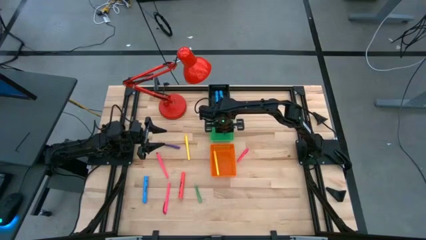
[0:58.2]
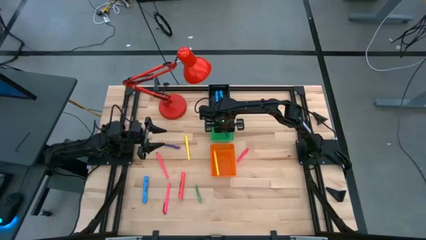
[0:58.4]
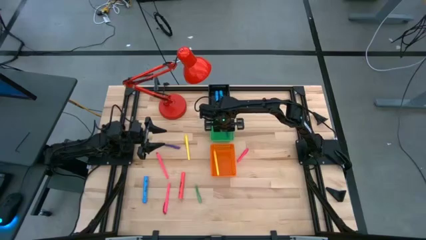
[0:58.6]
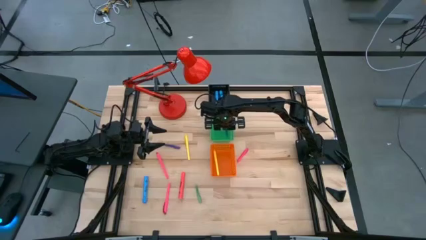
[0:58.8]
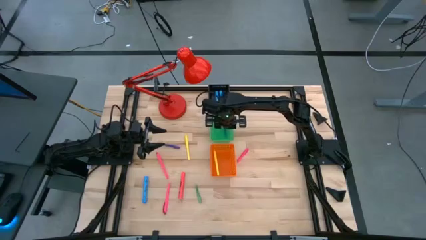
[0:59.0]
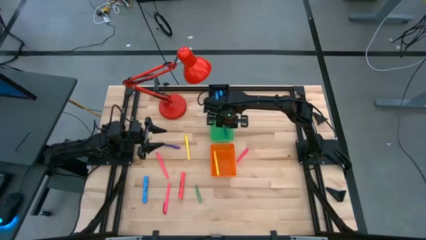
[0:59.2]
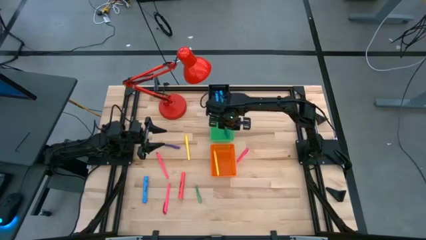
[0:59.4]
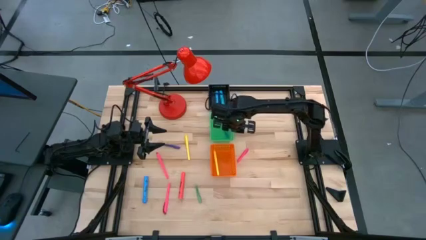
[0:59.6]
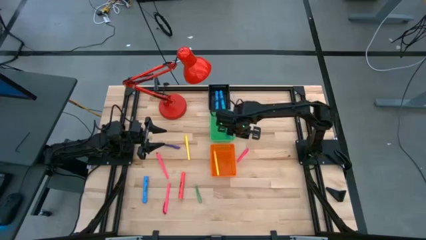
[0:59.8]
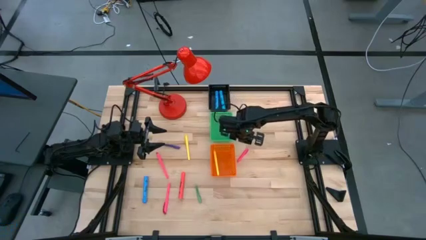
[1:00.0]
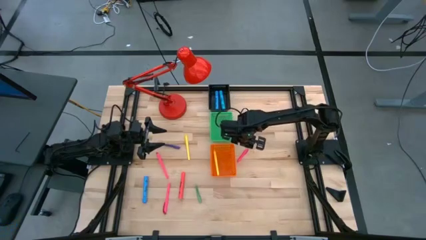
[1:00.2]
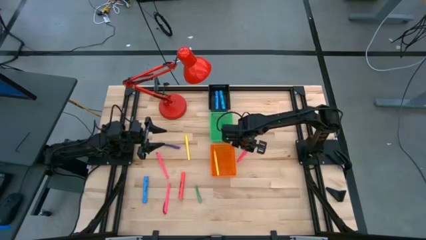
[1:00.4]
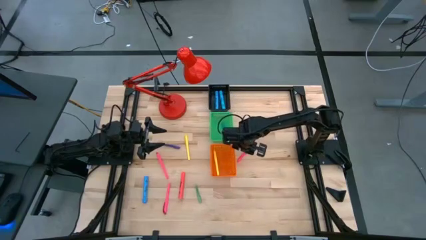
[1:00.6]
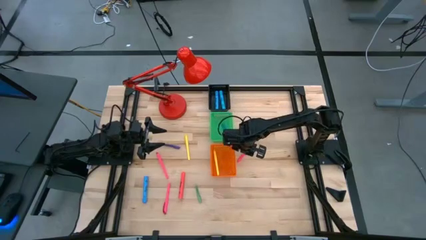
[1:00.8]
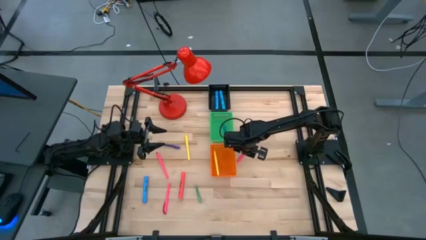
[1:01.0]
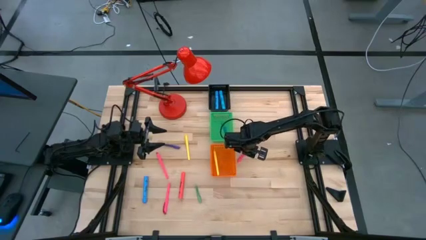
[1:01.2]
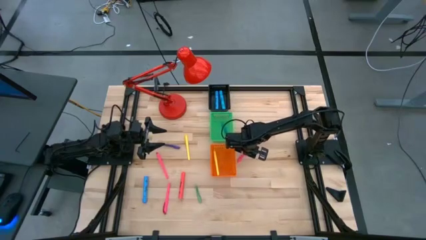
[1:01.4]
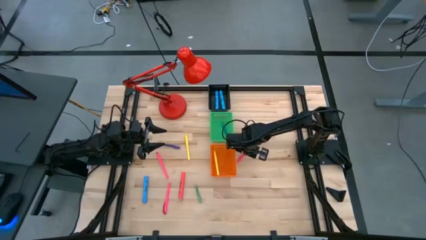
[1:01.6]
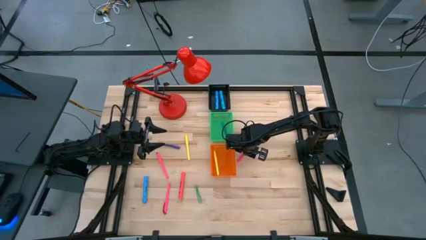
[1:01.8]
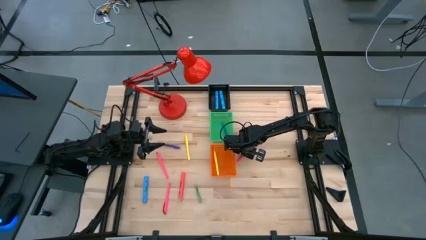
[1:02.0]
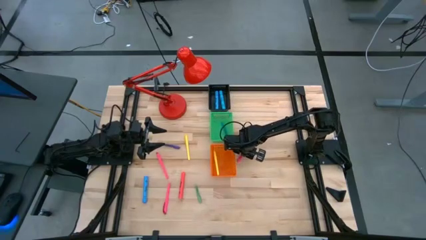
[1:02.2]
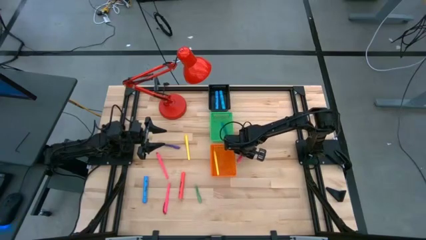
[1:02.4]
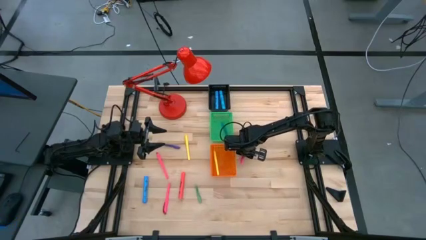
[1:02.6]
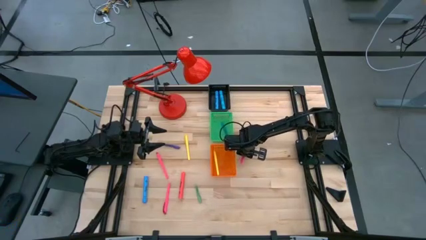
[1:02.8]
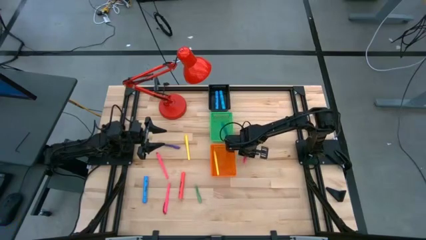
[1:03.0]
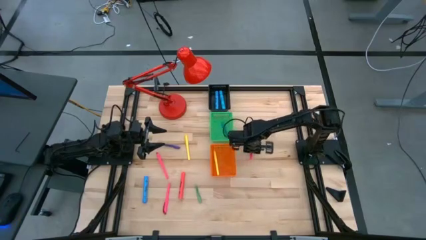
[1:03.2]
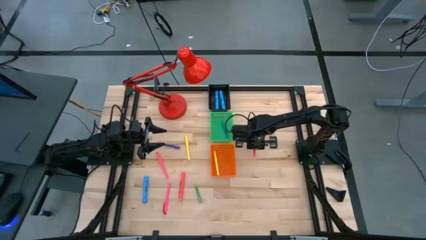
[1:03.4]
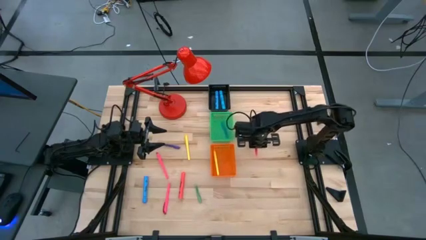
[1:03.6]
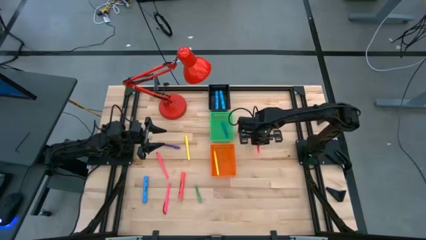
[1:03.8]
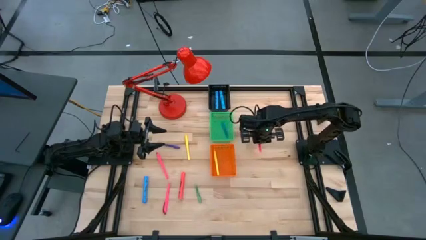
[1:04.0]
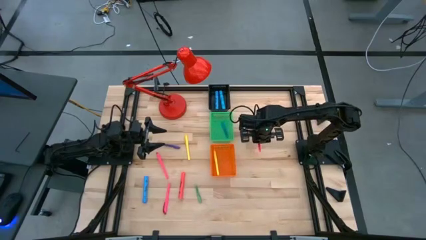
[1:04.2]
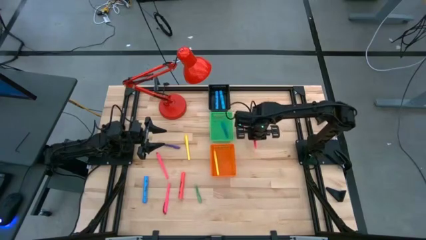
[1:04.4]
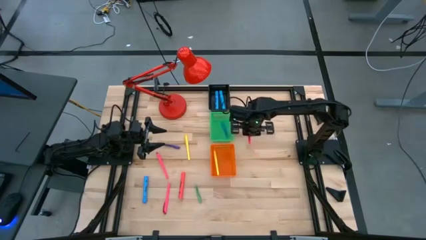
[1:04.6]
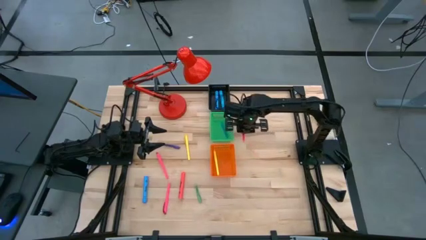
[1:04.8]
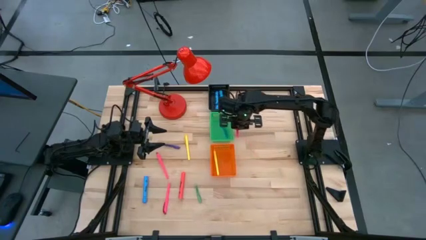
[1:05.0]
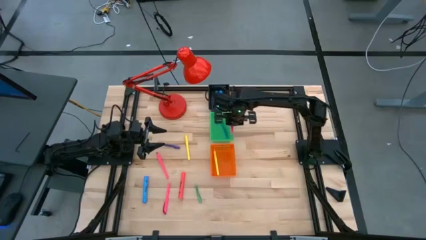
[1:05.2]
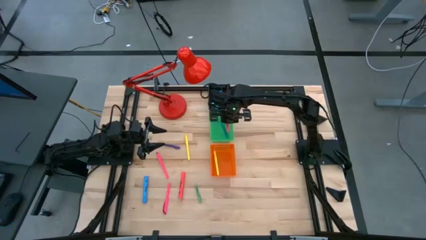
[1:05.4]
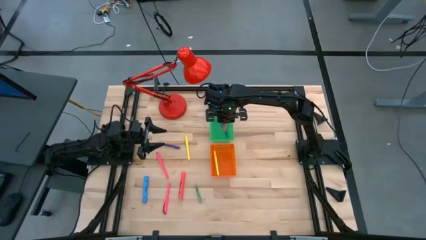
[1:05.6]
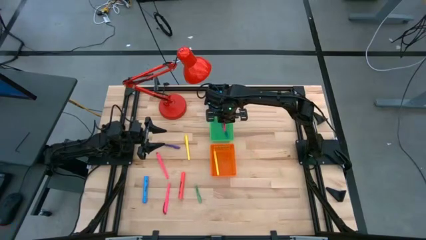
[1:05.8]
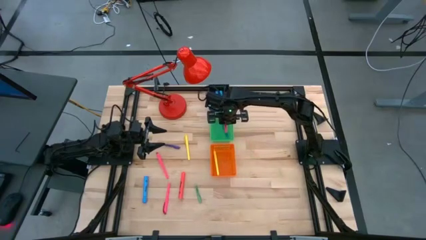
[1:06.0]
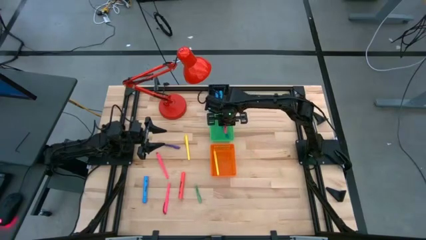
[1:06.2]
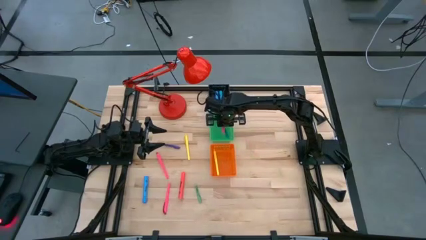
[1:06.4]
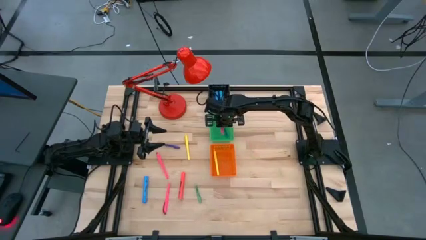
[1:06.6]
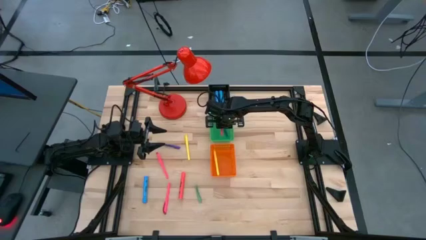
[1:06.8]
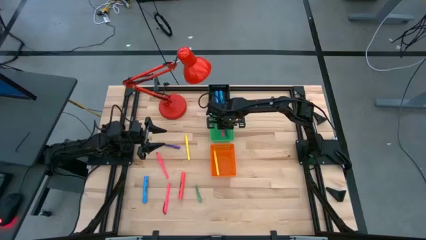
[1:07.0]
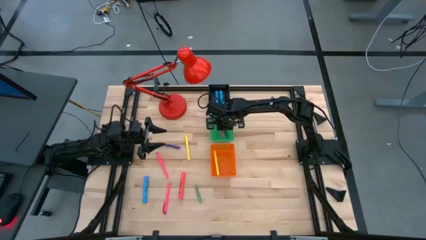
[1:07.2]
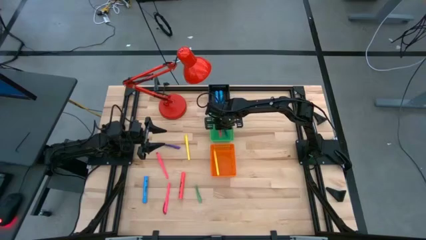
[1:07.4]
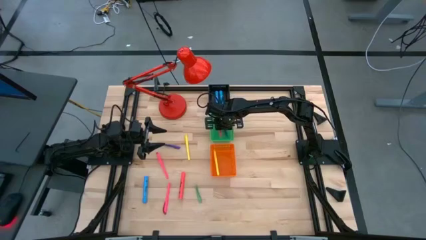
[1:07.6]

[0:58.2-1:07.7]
Task: Pick & Place Markers
Put the pink marker into the green bin

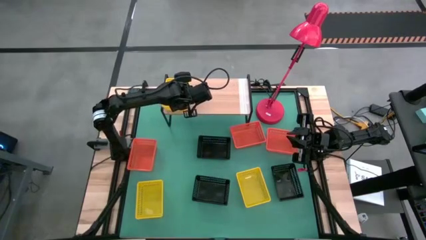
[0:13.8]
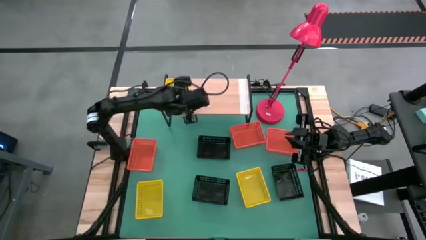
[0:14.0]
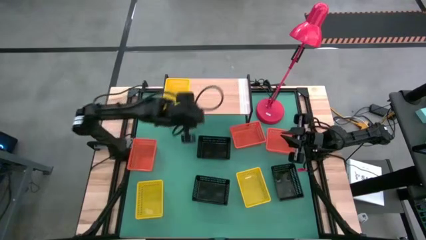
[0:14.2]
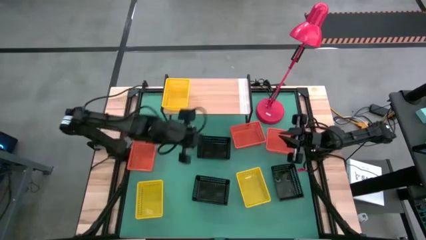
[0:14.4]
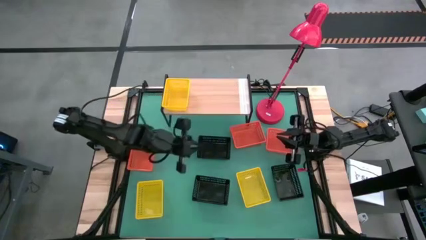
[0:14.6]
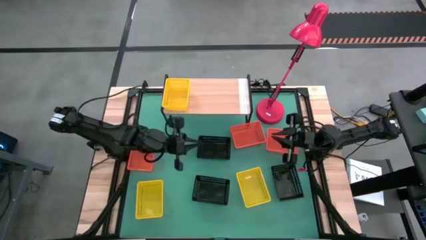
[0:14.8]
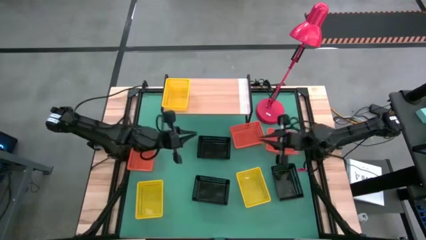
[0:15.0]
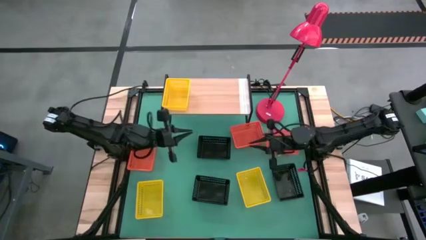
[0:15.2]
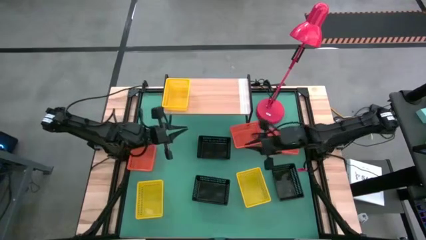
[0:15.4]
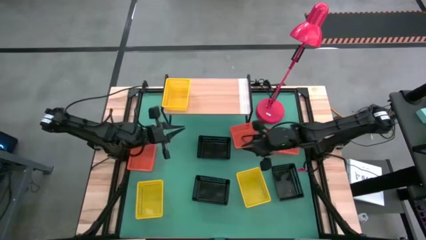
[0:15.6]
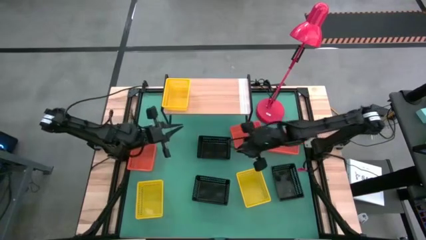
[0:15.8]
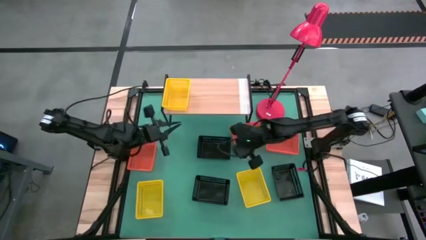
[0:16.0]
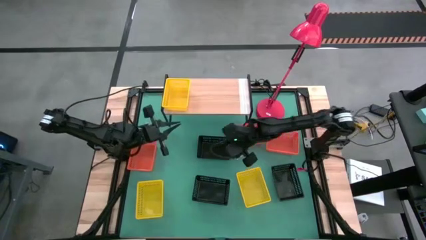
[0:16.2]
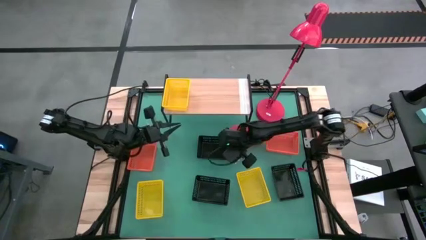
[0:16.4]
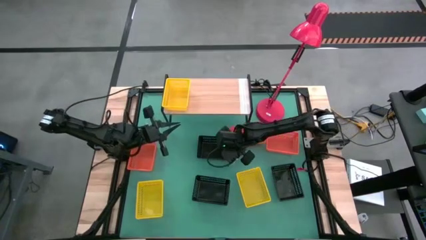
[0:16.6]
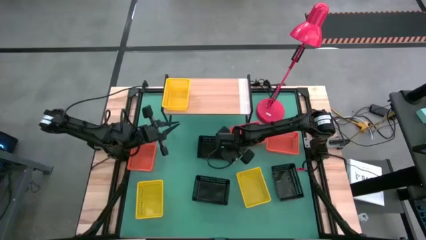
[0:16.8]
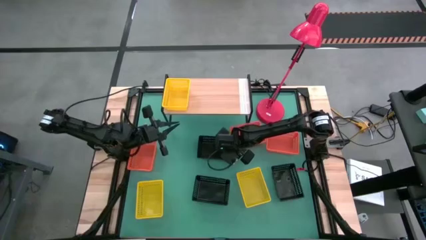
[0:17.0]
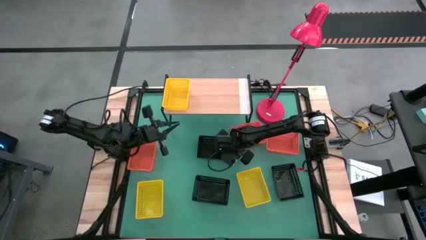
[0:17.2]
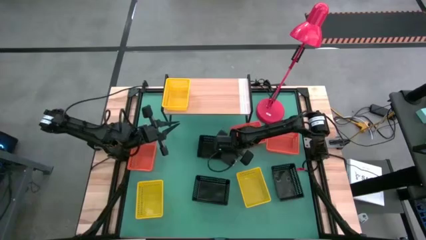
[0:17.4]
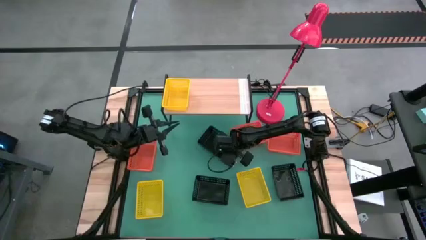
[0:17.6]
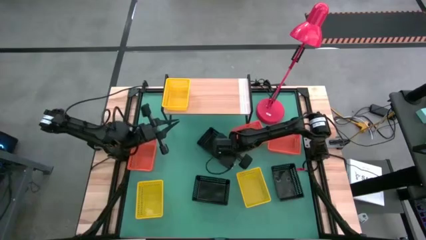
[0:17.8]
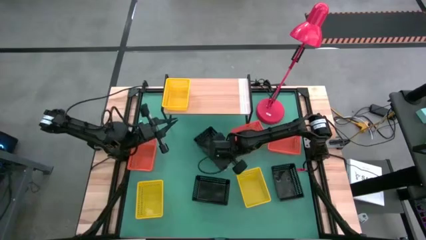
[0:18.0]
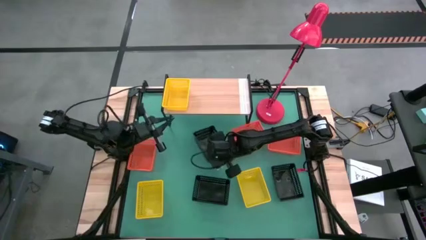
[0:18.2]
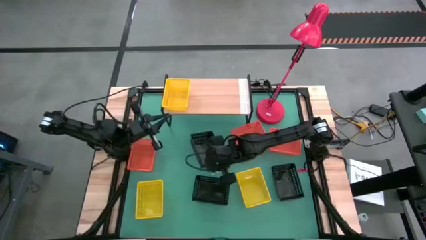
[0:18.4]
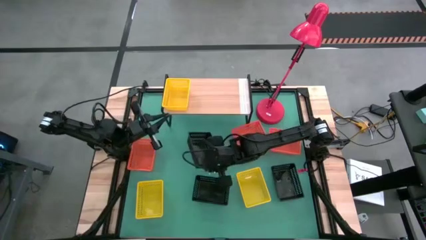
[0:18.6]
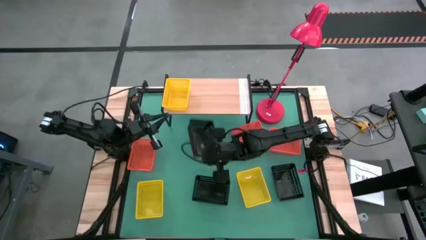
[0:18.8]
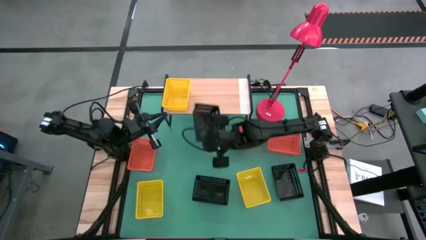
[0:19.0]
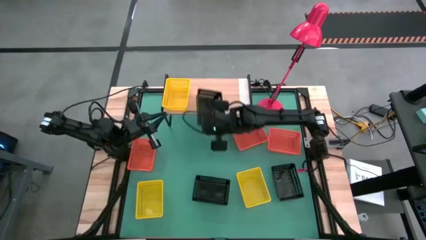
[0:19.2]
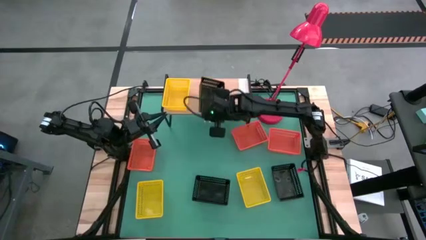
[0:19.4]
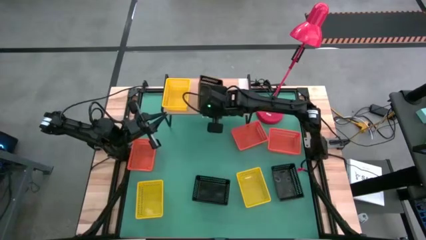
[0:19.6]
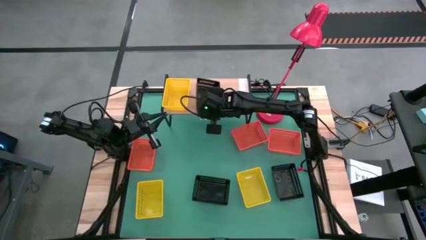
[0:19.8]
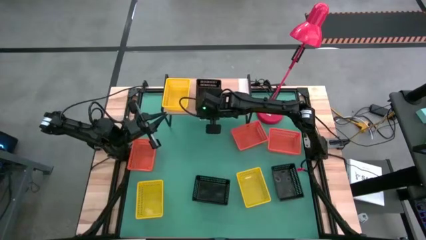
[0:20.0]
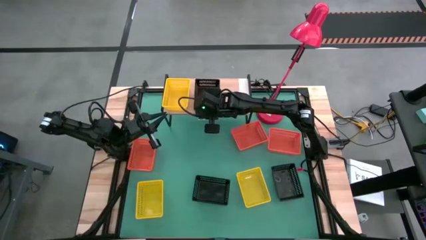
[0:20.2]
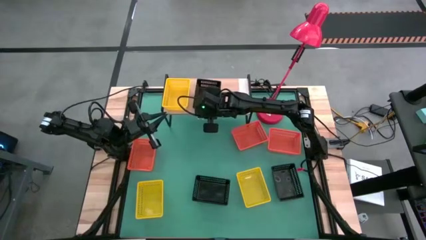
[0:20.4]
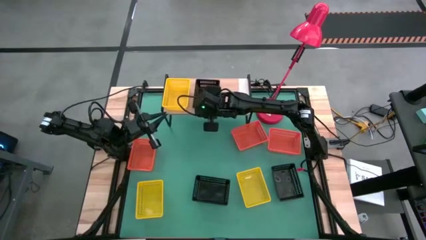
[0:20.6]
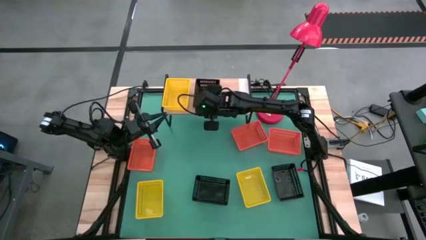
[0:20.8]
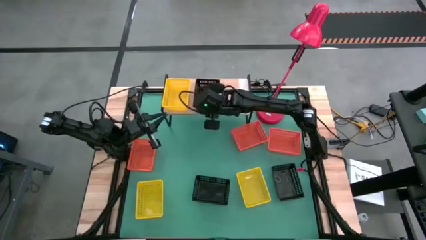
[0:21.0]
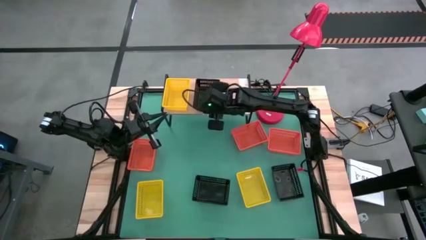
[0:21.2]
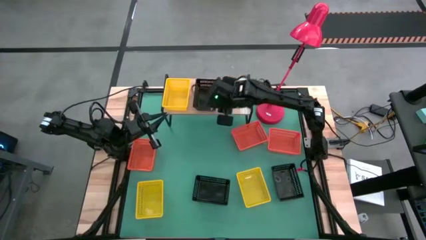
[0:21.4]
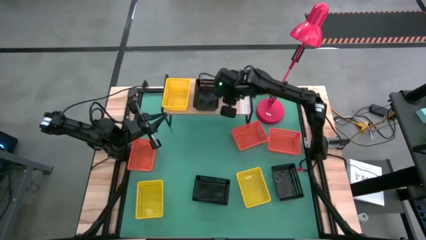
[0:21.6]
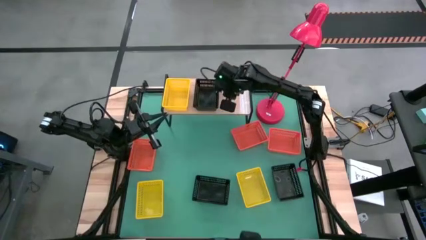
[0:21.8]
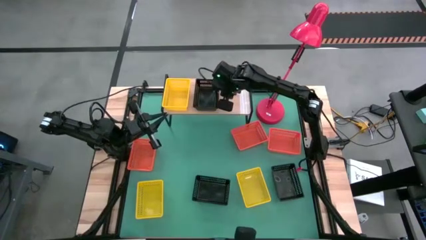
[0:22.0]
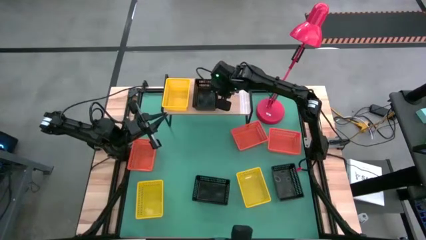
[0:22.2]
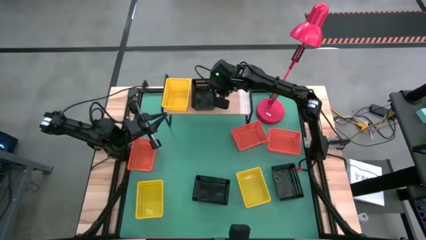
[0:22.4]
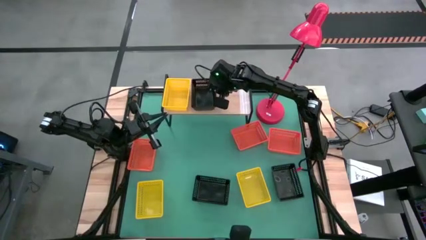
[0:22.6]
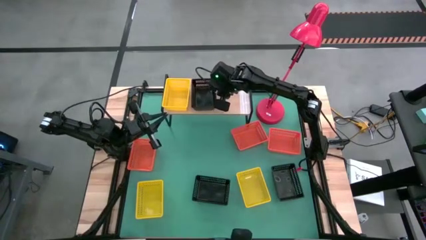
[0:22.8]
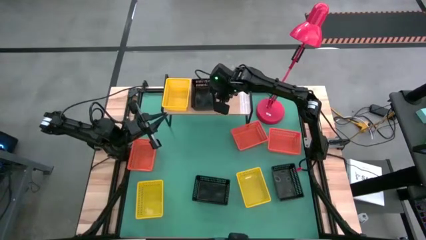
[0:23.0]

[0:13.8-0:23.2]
Task: Stack baskets on shelf by color
Put the top black bin on the shelf
